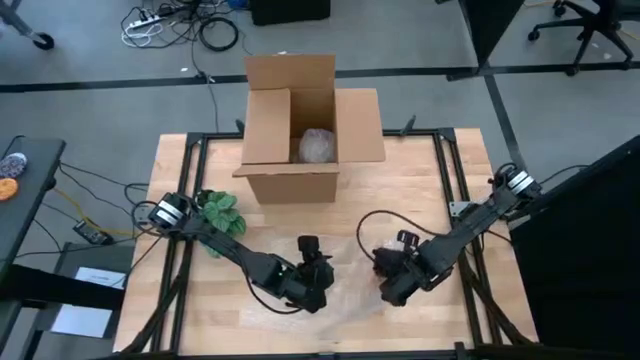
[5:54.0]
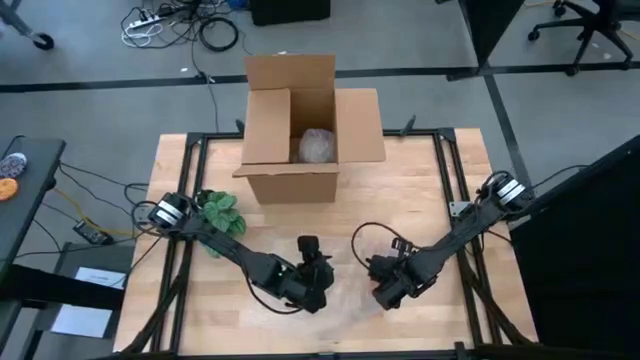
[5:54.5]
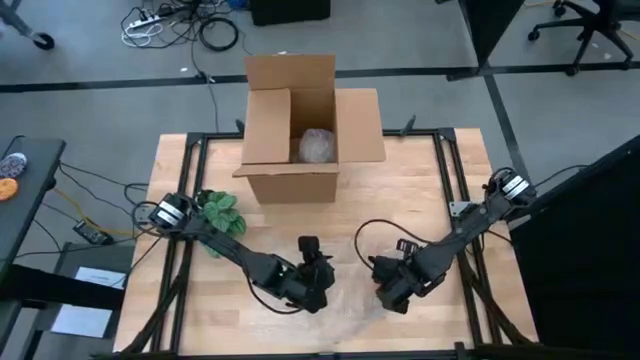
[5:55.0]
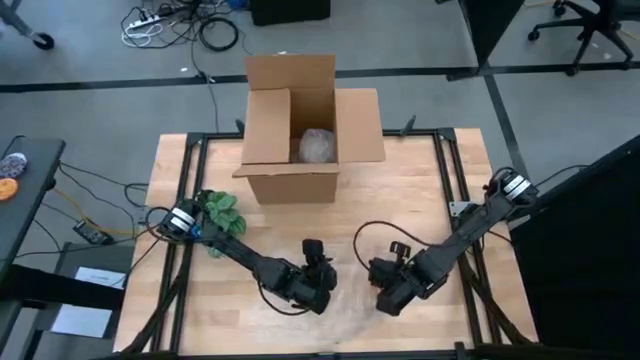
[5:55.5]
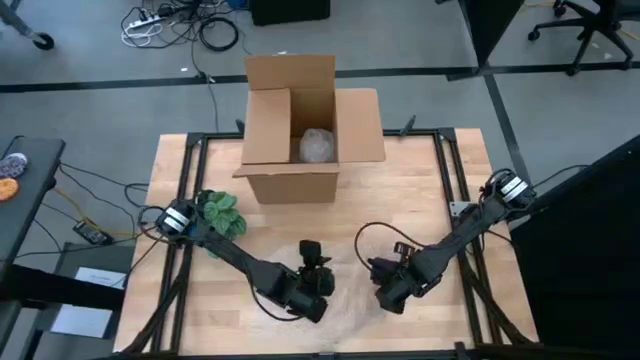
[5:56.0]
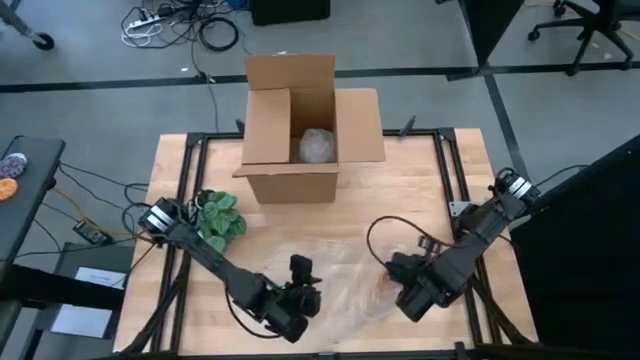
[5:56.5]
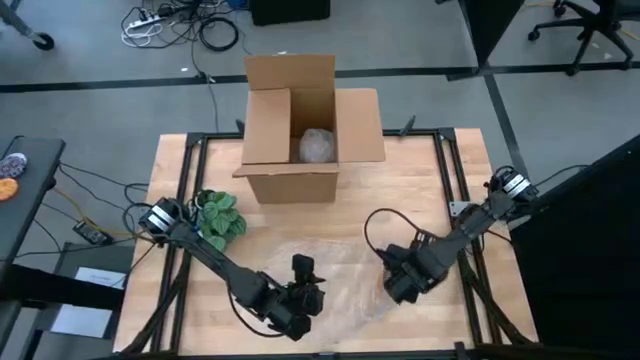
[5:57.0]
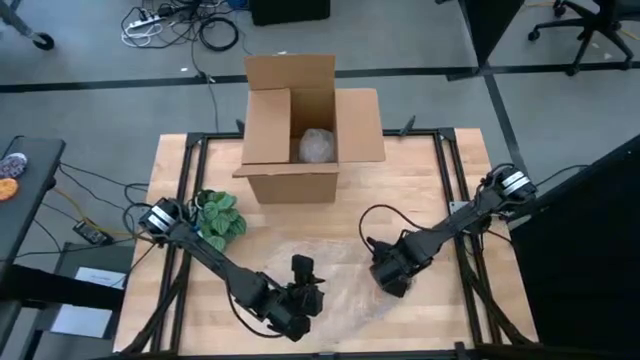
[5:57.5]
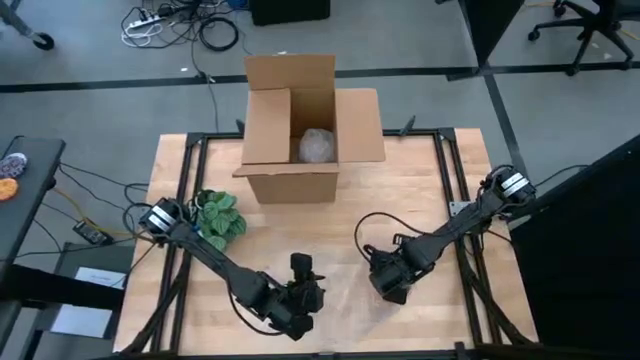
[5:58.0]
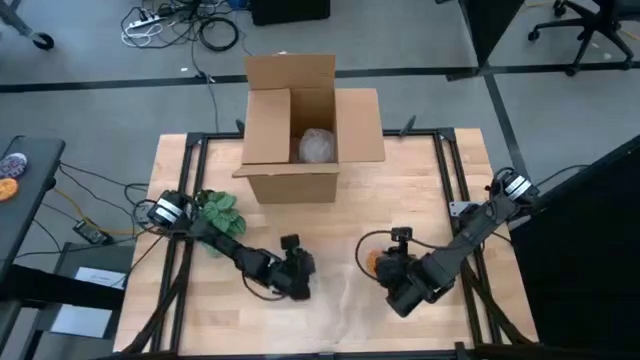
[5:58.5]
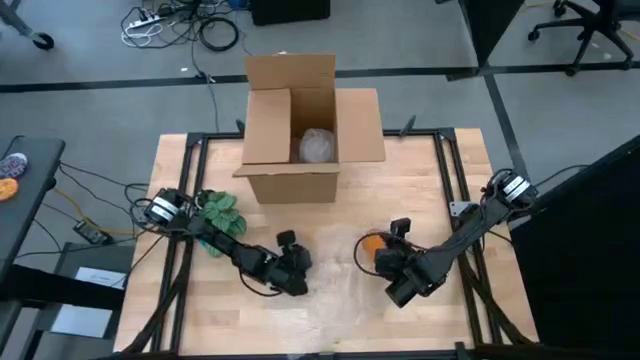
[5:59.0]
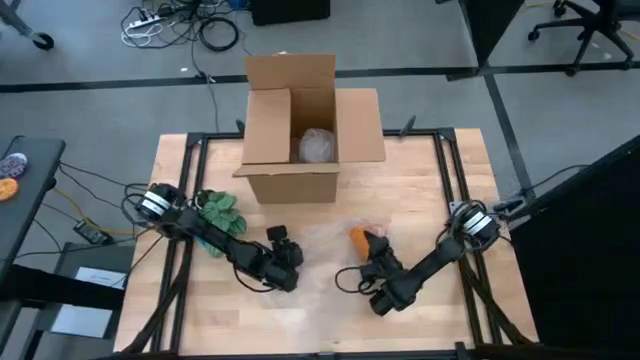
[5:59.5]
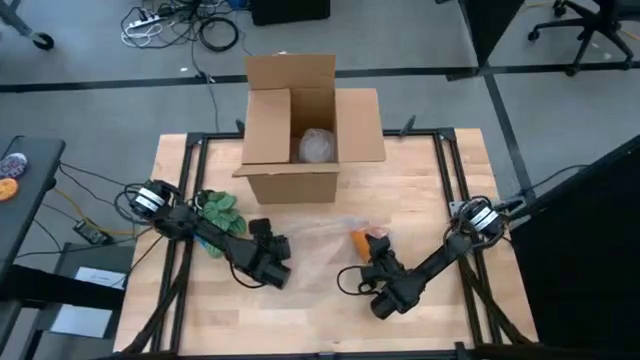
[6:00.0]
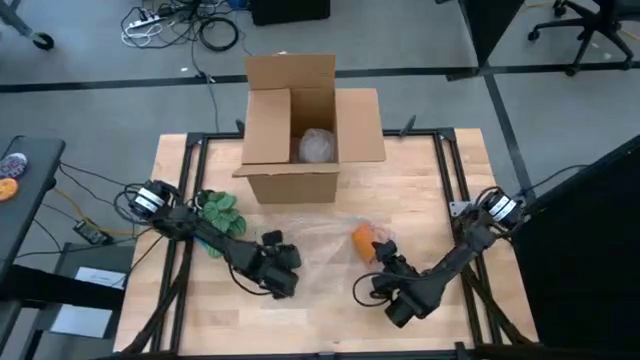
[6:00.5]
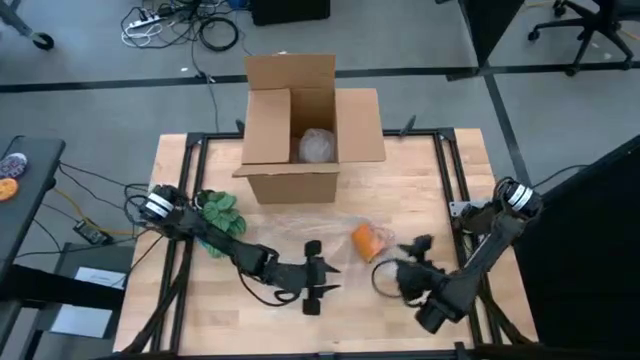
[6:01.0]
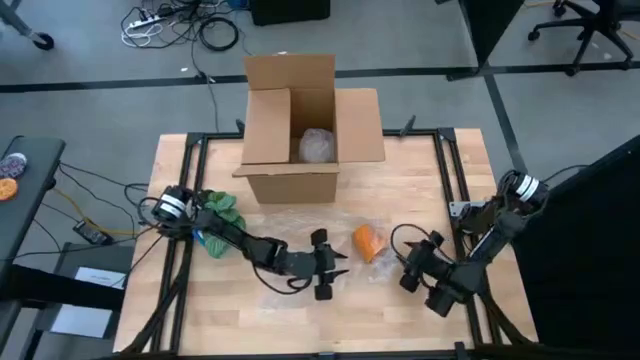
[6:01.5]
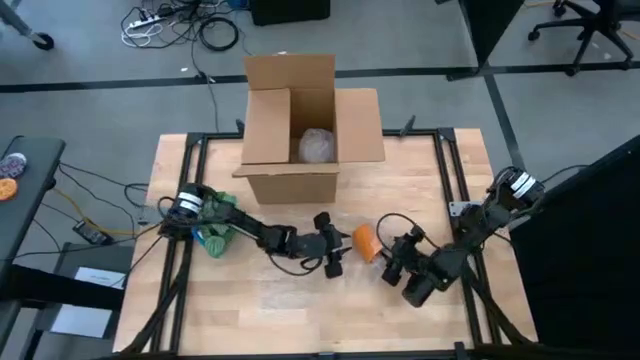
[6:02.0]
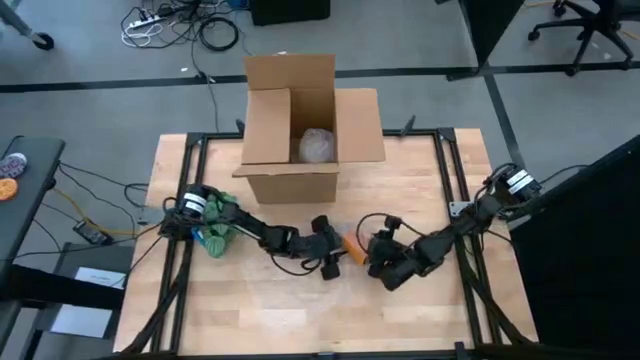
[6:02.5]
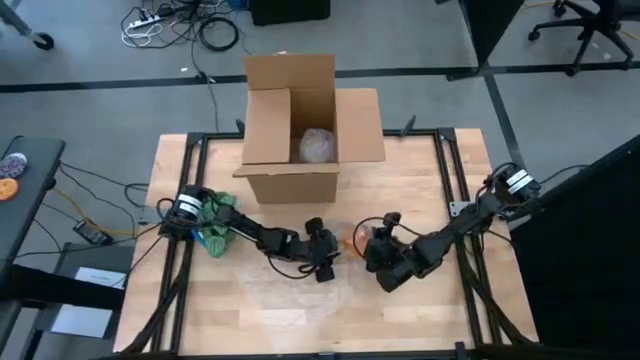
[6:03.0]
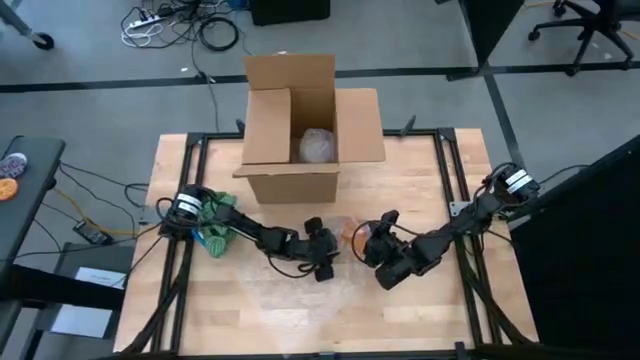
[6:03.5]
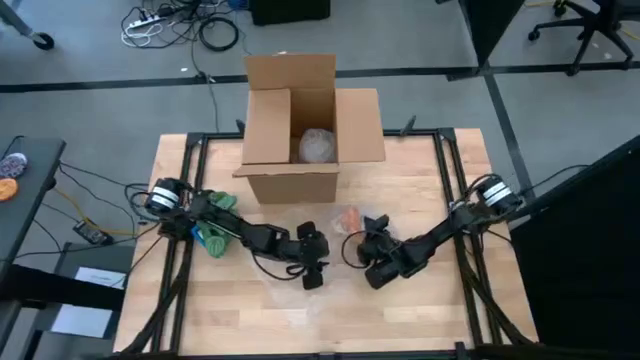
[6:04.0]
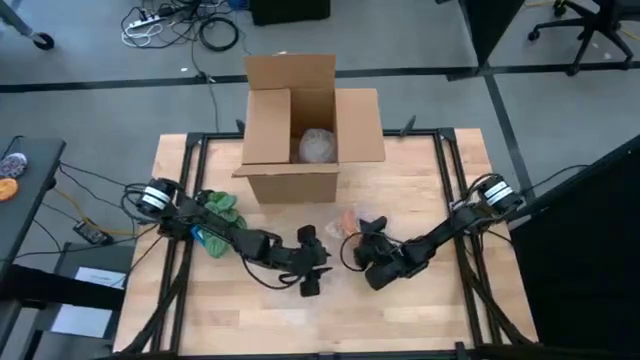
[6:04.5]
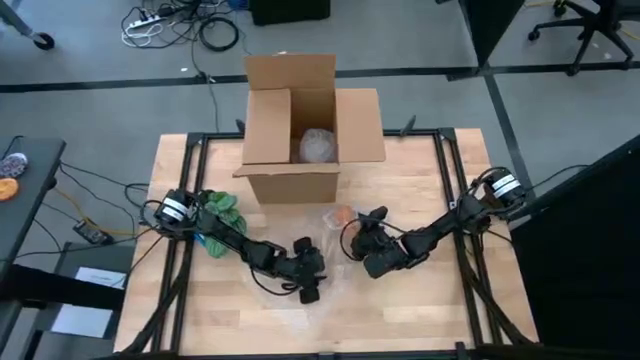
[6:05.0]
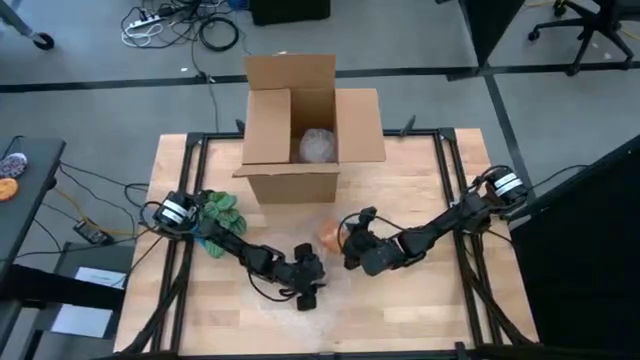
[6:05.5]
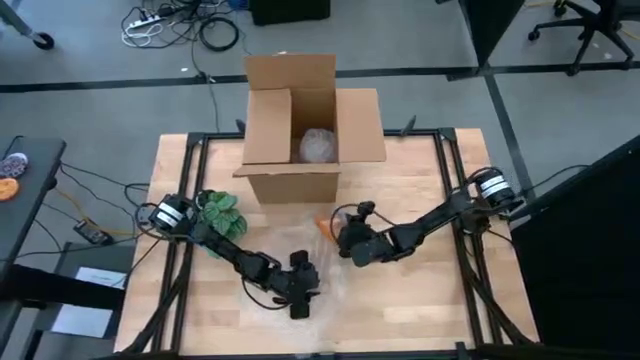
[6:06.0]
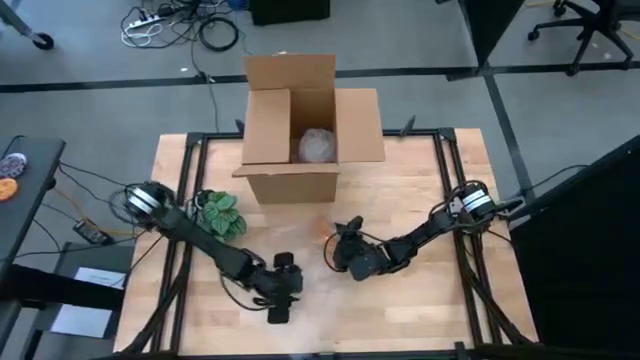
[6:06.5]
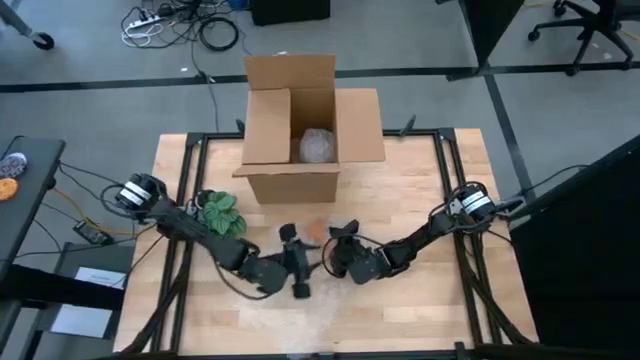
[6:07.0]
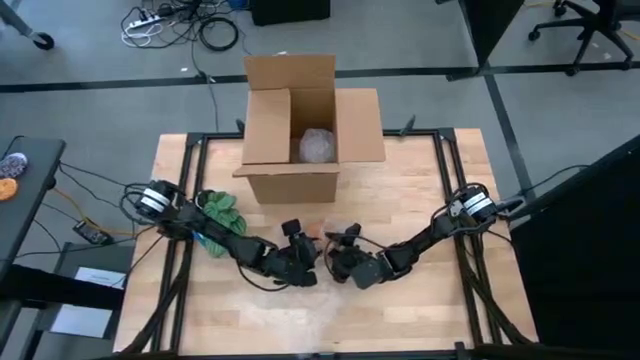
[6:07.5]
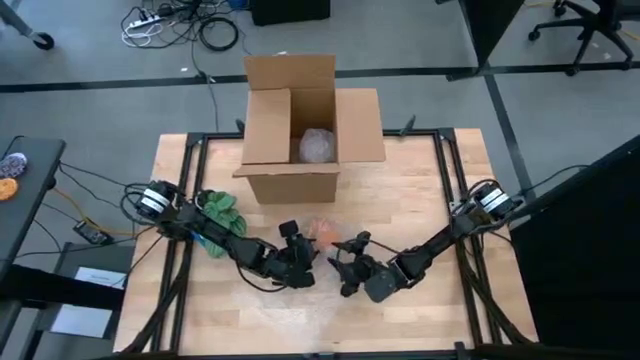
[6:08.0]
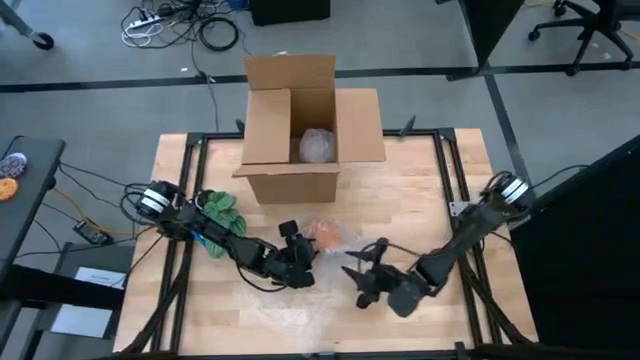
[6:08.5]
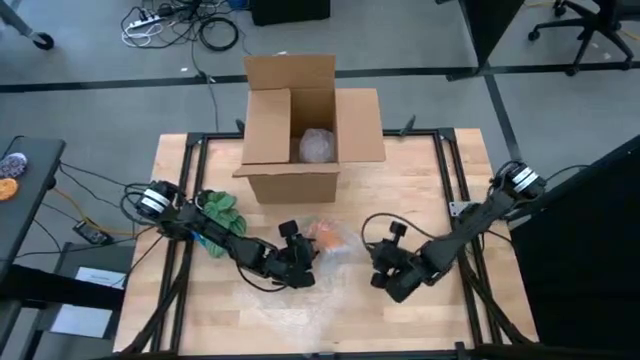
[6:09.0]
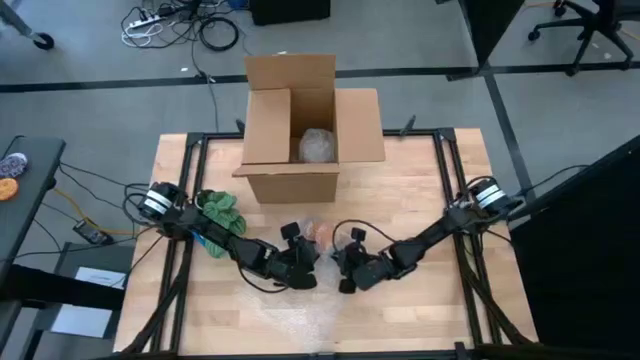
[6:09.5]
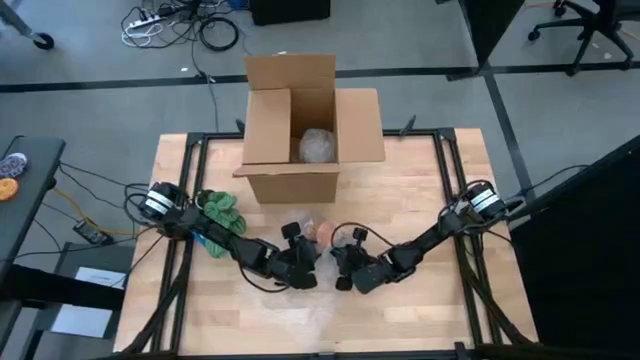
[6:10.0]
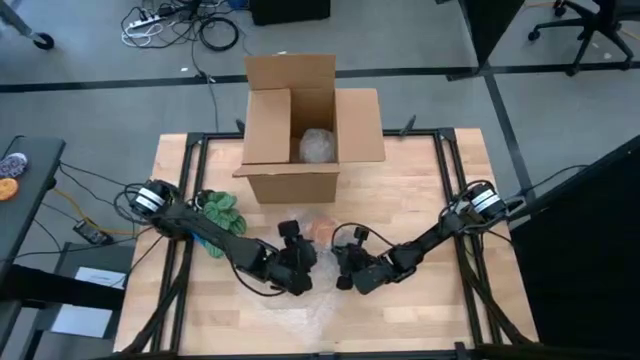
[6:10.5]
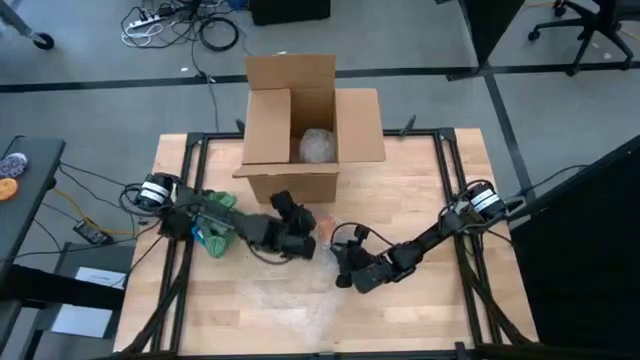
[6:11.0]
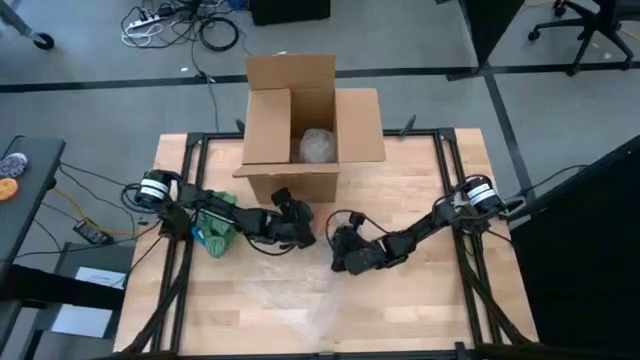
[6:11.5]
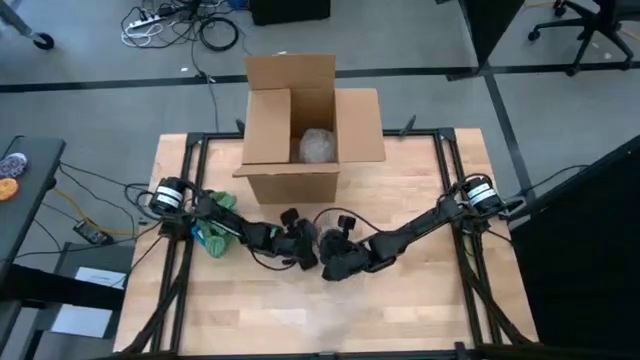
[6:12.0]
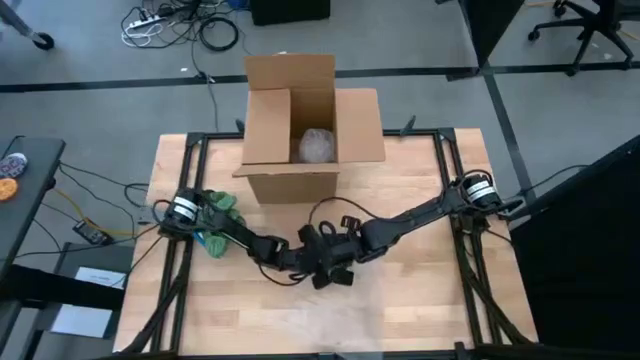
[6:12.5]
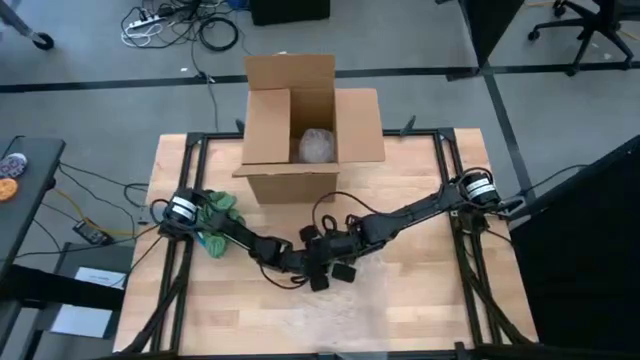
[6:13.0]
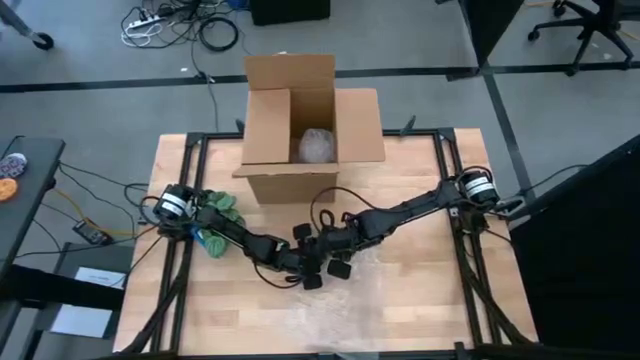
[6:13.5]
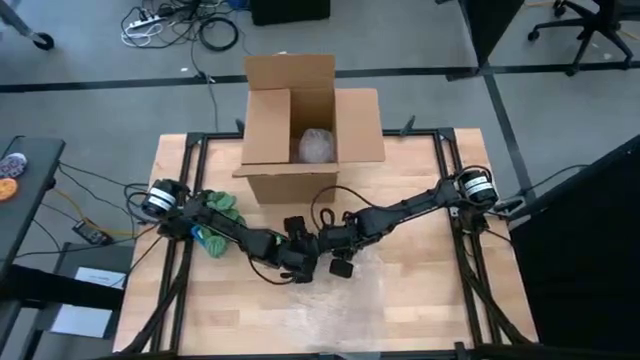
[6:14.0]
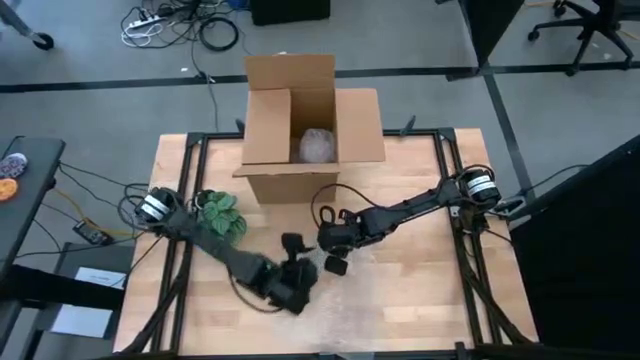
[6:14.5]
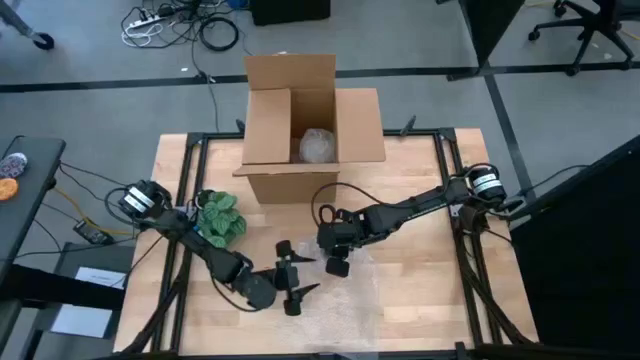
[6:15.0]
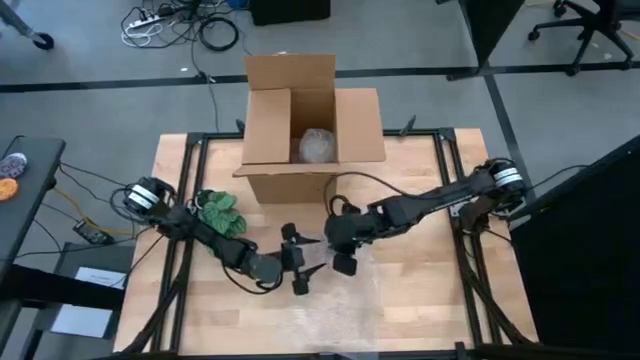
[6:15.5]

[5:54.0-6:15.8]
Task: wrap mug
Wrap the orange mug with the bubble wrap
